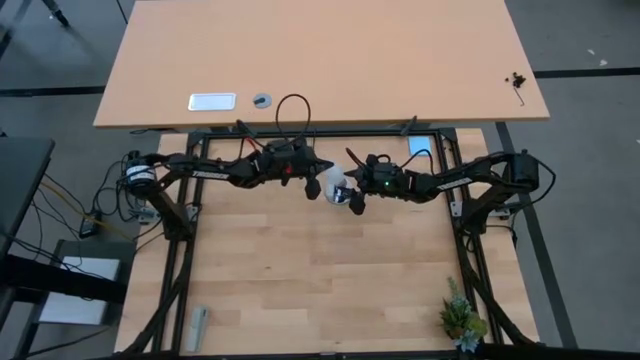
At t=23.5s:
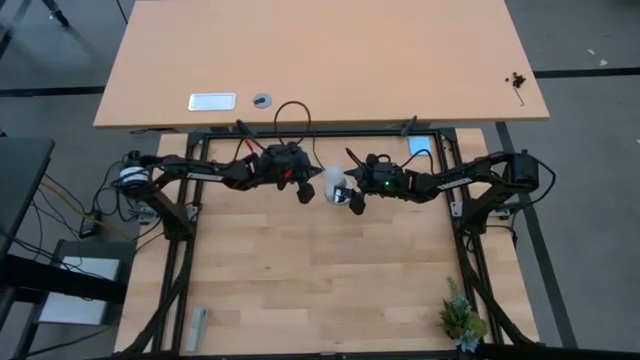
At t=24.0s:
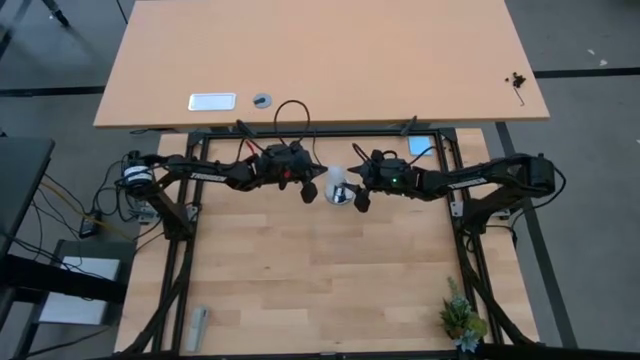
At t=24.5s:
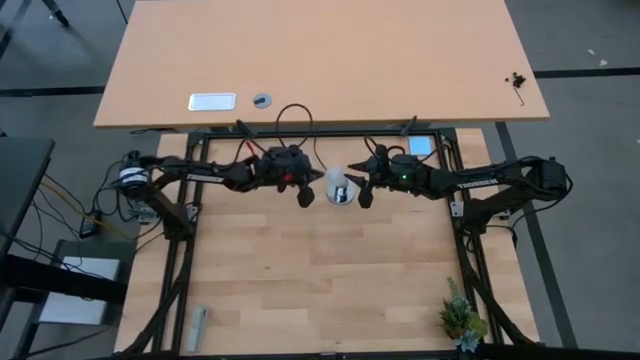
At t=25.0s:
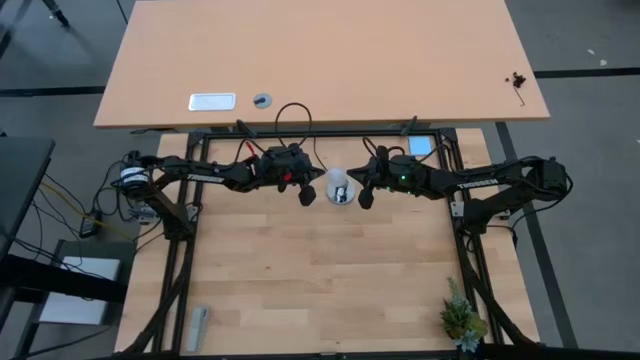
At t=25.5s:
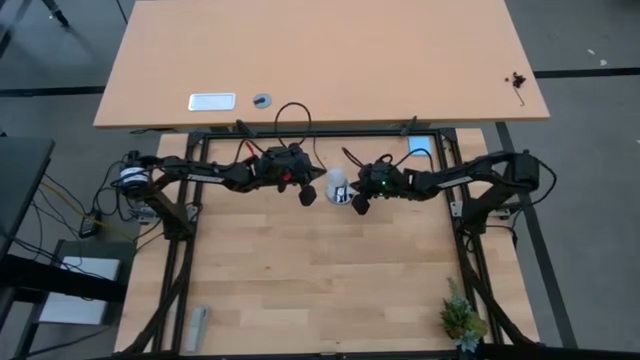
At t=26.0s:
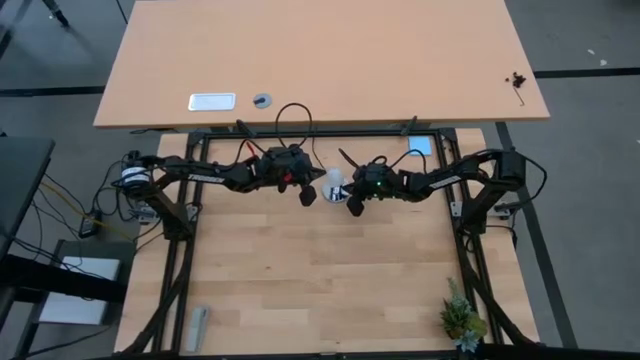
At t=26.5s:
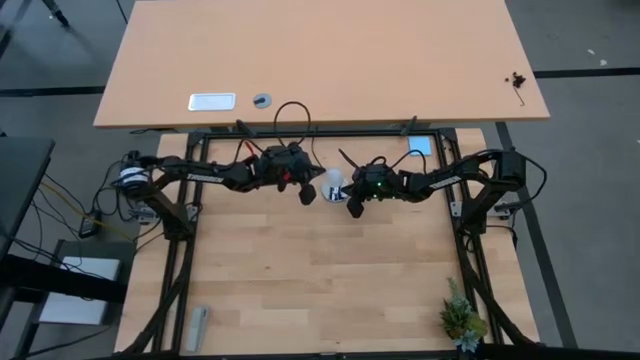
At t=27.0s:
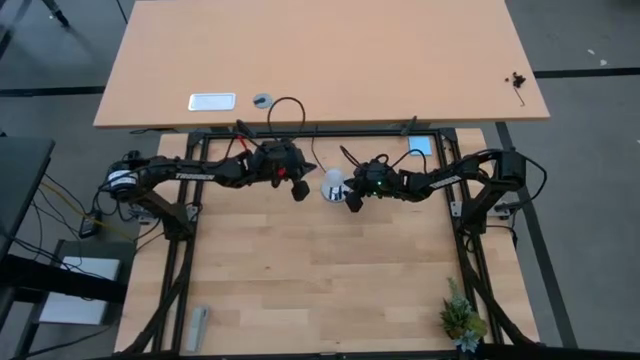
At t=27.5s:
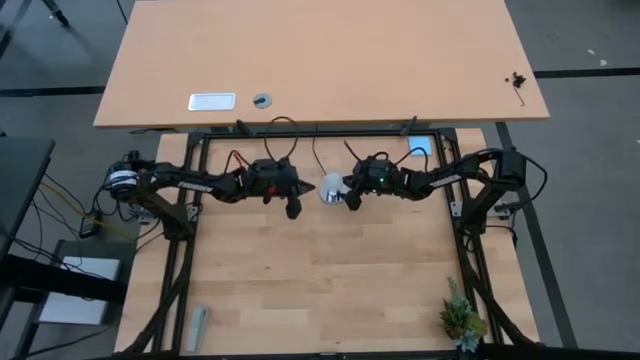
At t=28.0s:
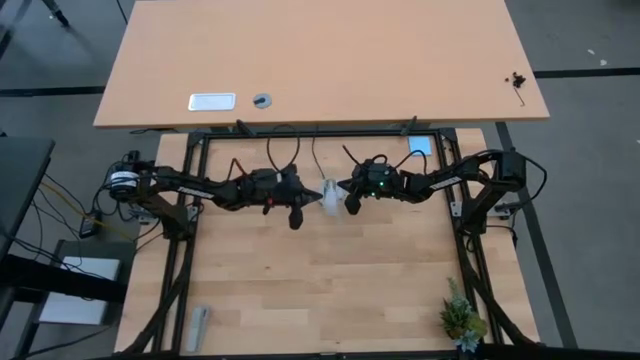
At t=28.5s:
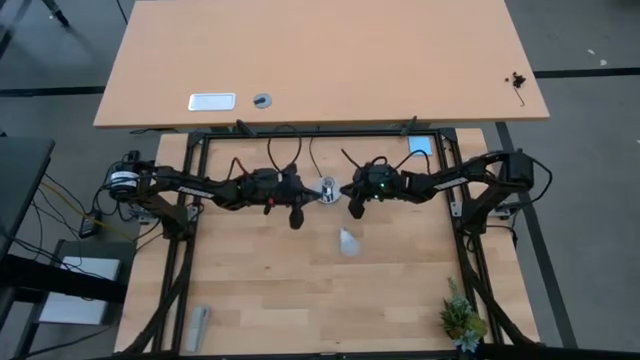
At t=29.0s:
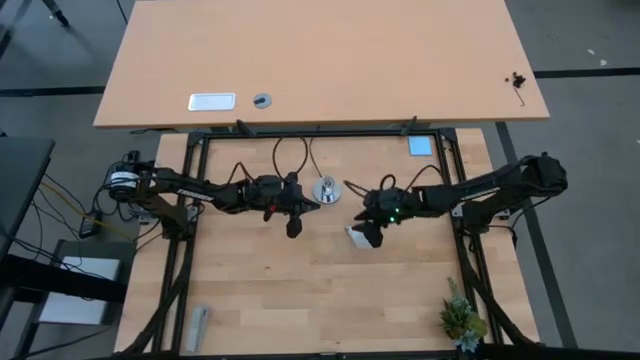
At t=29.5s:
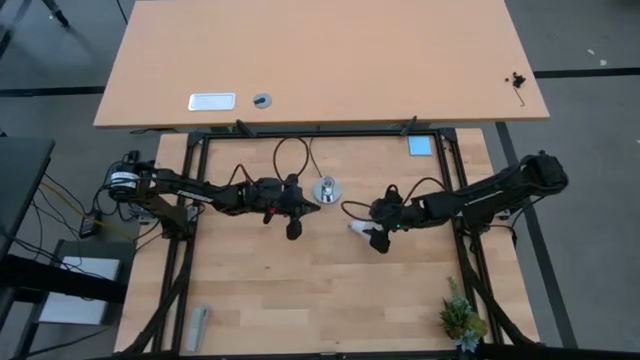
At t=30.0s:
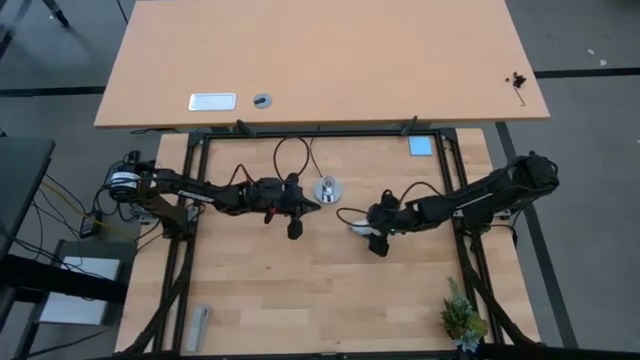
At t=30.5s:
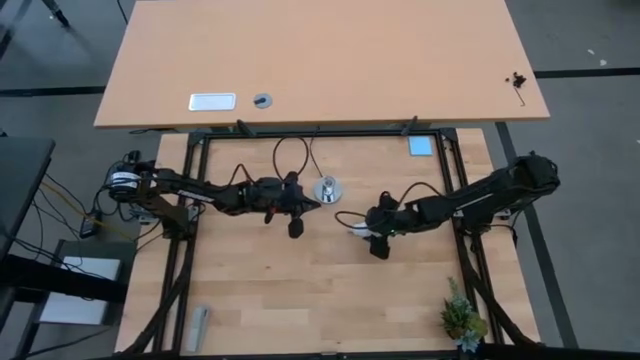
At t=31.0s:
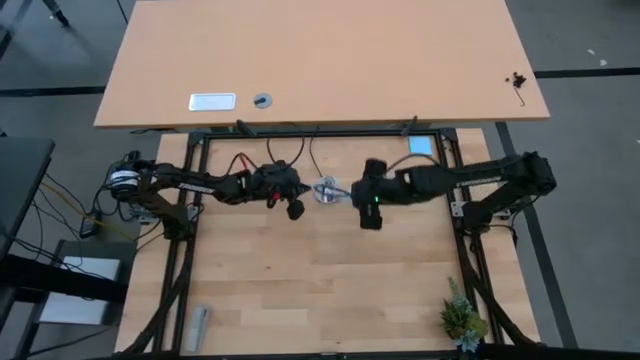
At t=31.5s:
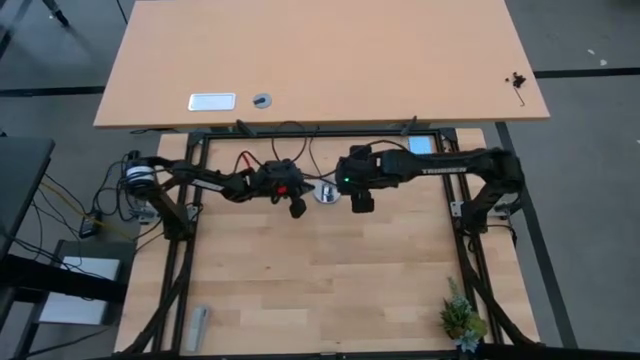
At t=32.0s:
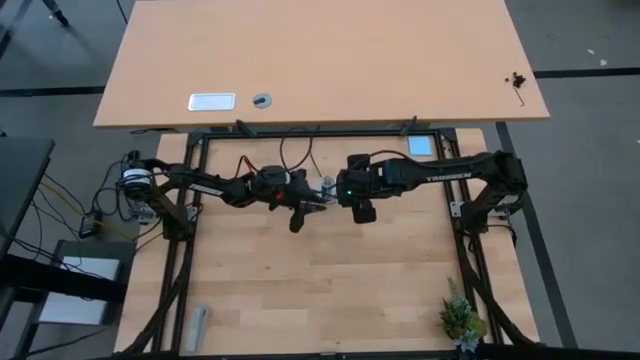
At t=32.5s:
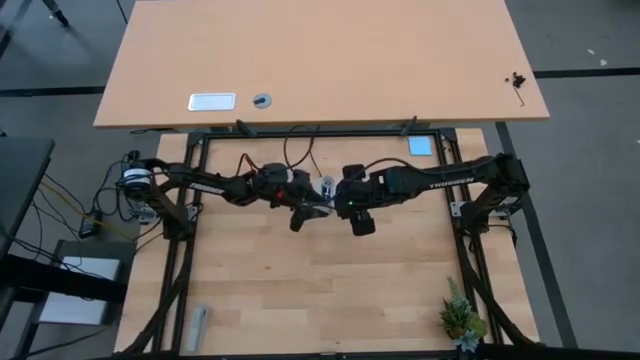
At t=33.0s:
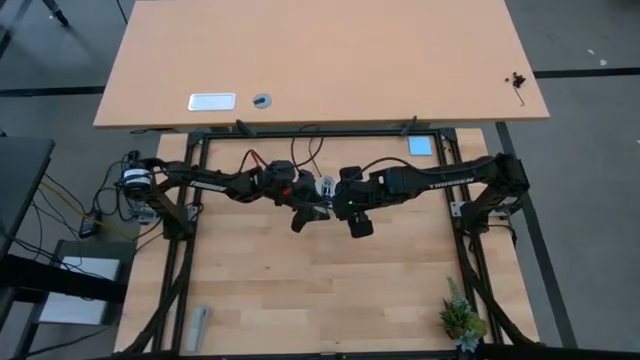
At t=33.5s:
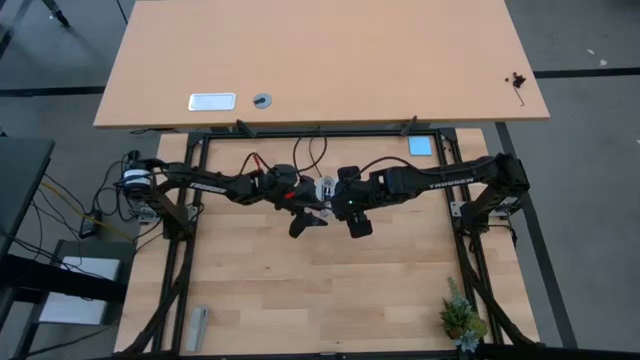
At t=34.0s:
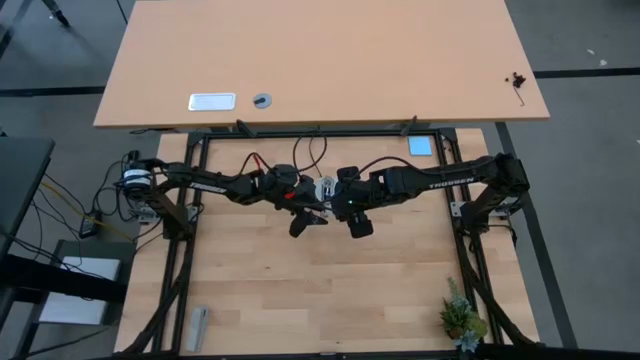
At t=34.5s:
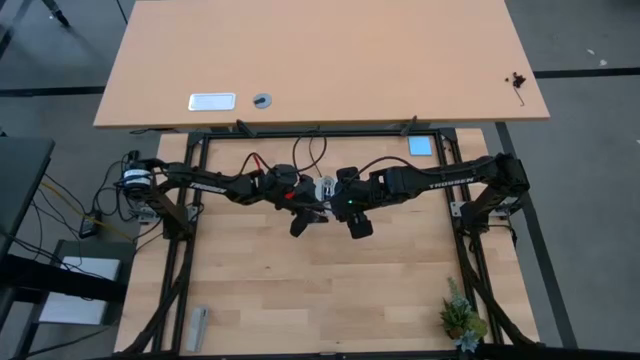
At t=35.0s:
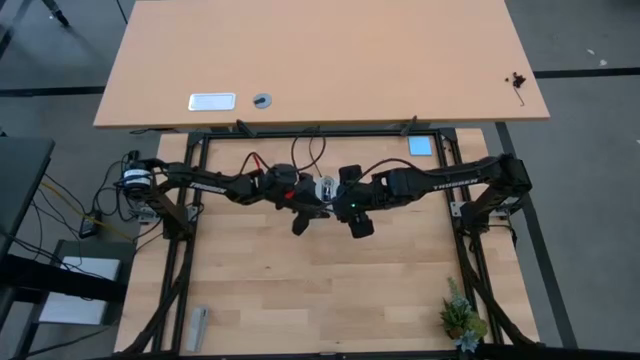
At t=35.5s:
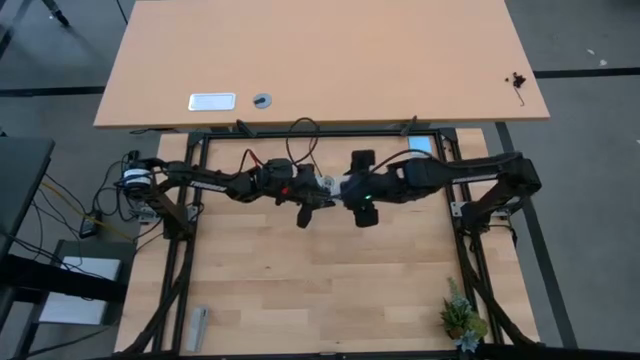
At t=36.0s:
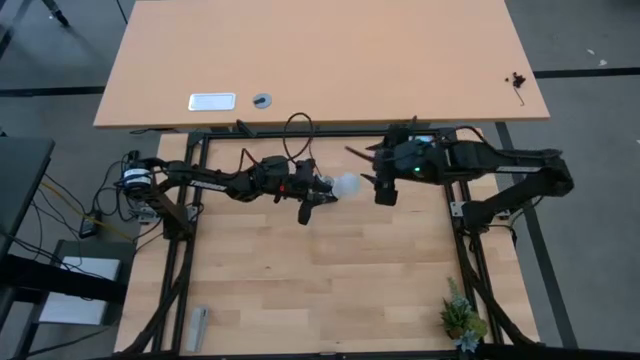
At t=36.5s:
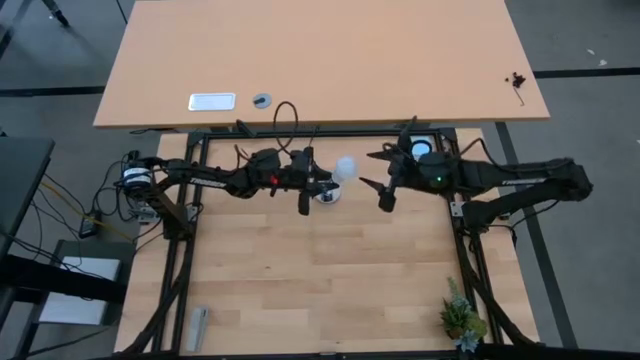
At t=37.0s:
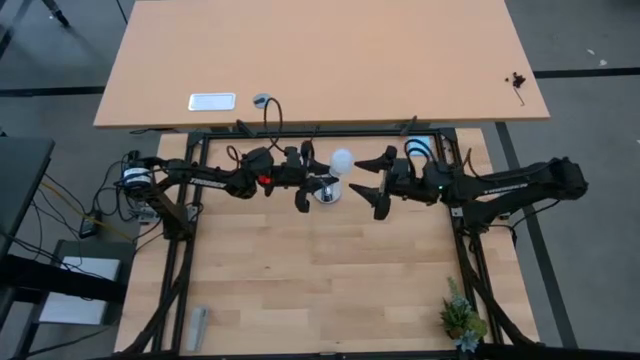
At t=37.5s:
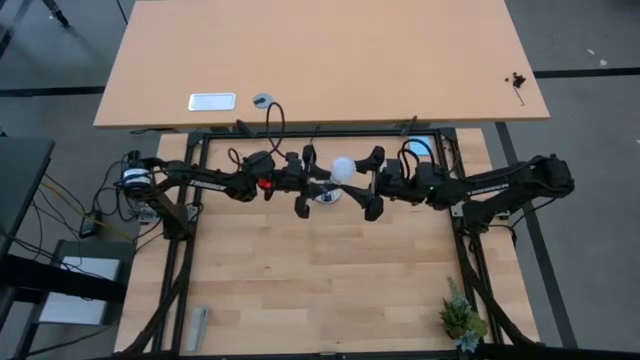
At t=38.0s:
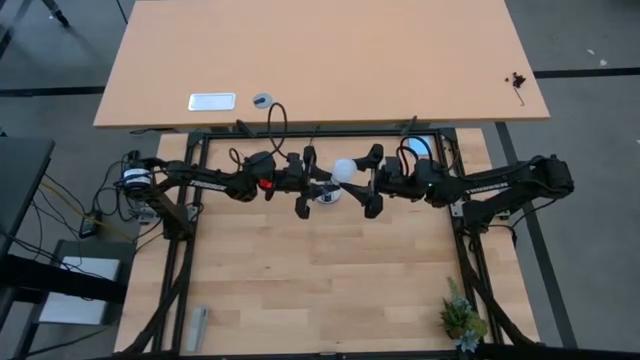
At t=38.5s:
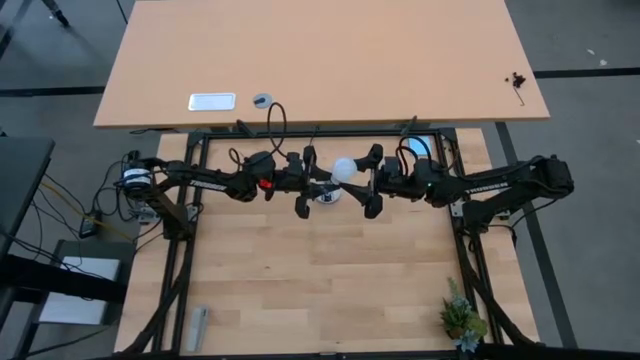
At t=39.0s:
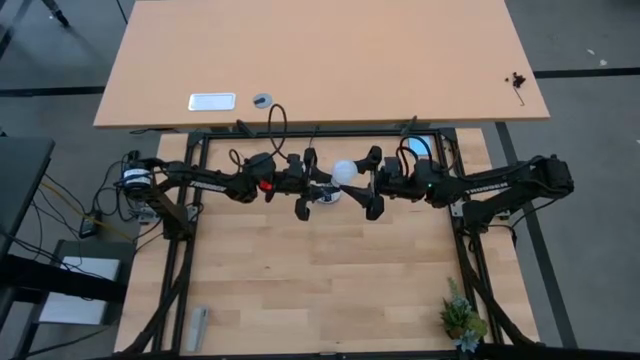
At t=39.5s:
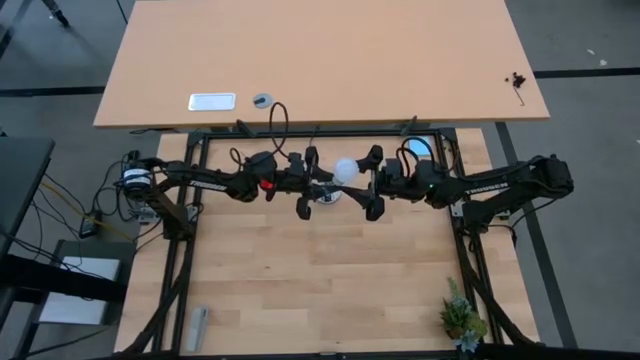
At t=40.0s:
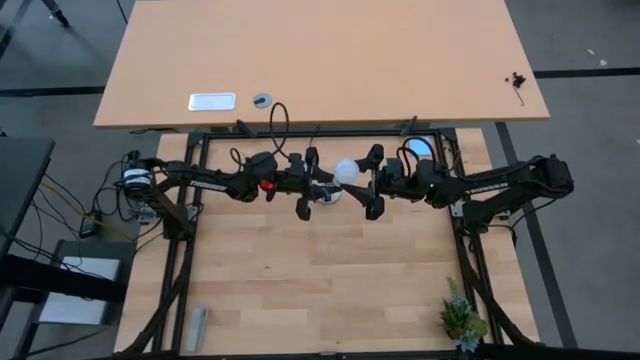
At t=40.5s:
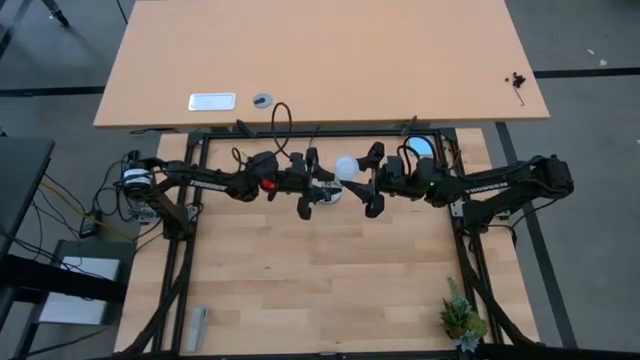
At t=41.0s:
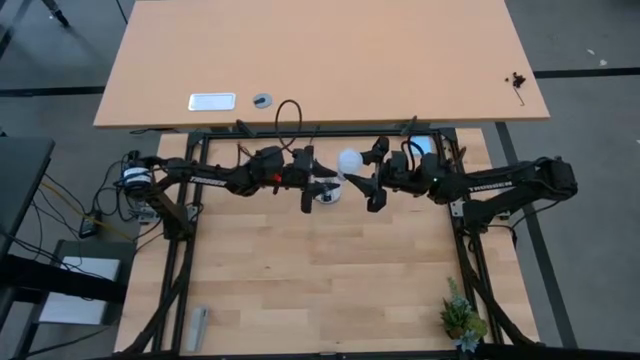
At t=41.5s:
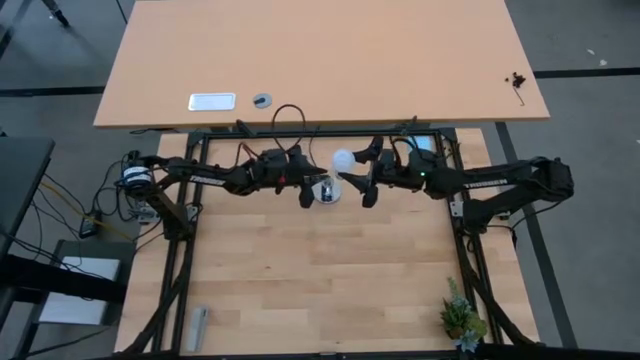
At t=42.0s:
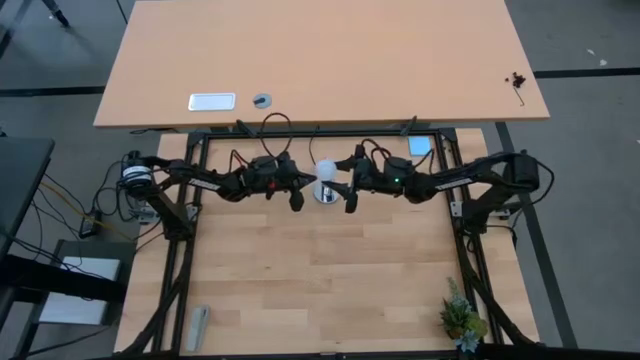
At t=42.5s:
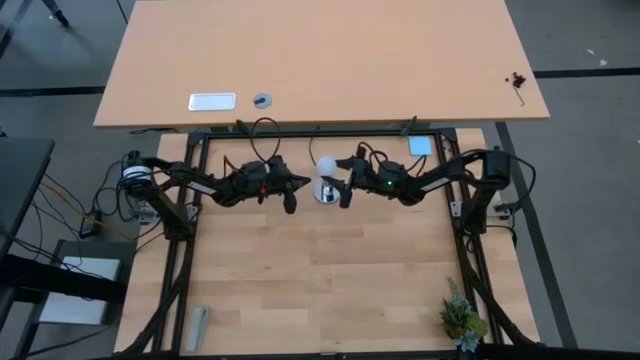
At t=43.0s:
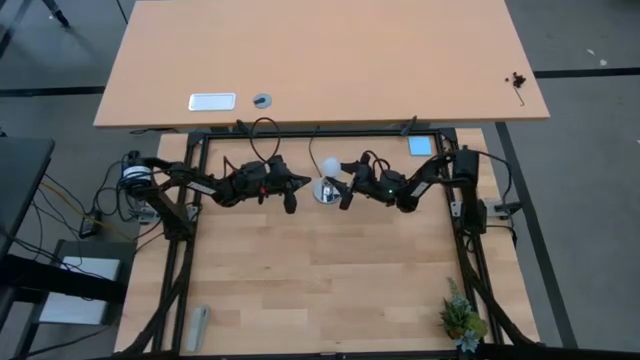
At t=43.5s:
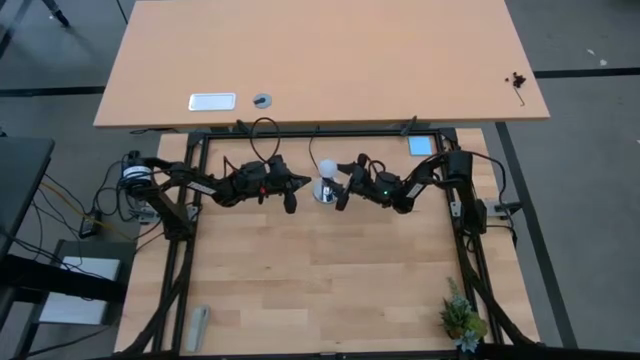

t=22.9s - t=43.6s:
Task: Screw lightbulb
Insert the lightbulb into the lamp
